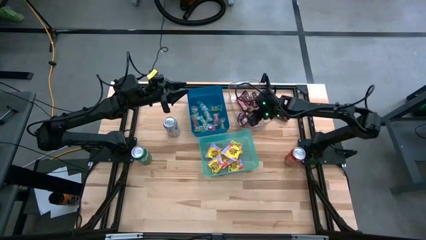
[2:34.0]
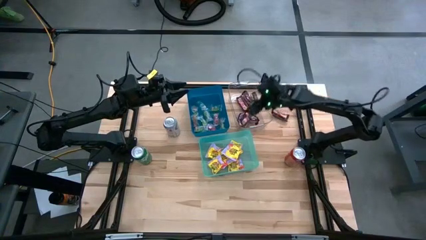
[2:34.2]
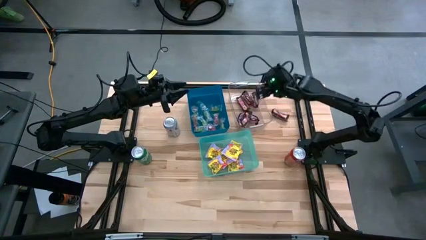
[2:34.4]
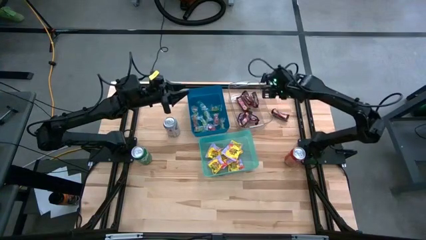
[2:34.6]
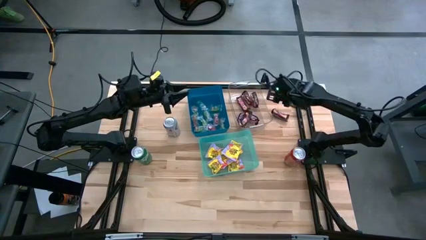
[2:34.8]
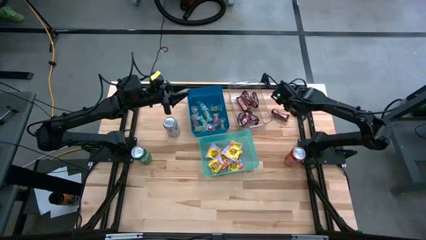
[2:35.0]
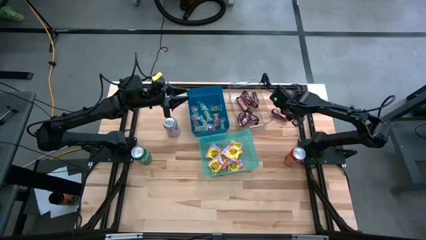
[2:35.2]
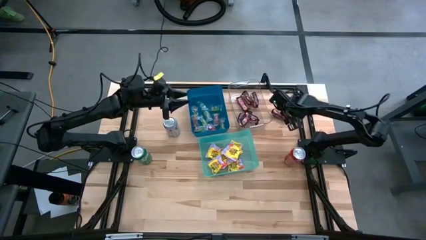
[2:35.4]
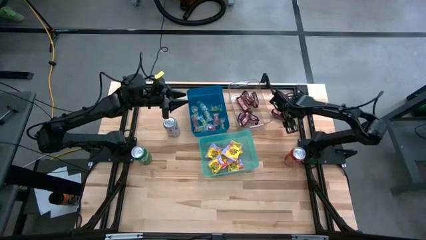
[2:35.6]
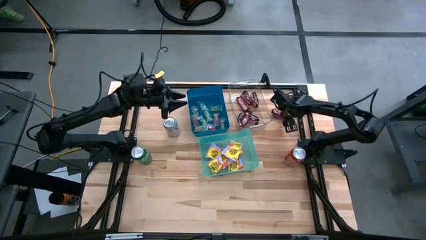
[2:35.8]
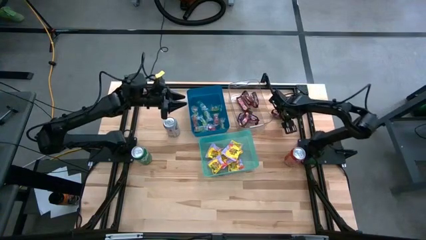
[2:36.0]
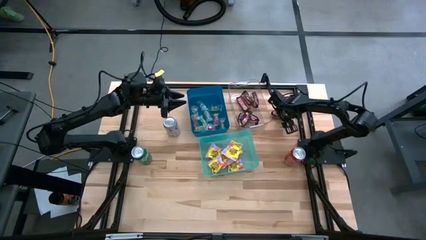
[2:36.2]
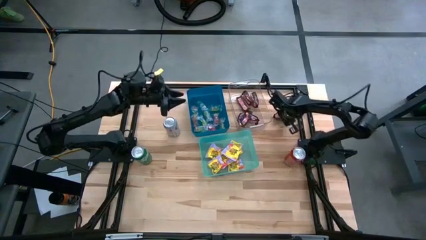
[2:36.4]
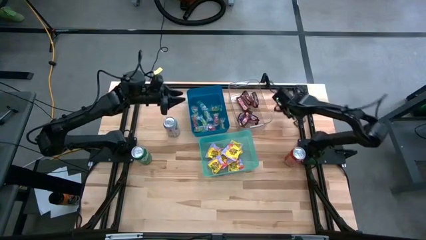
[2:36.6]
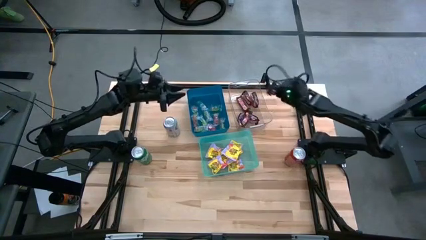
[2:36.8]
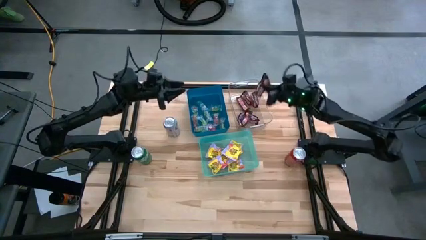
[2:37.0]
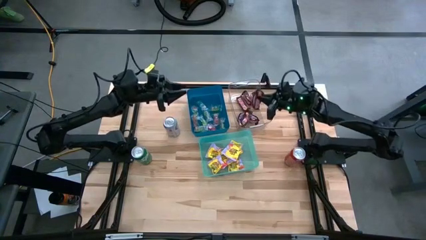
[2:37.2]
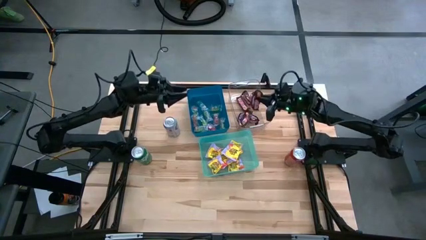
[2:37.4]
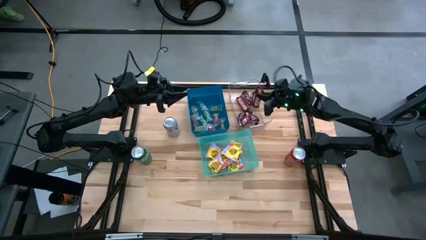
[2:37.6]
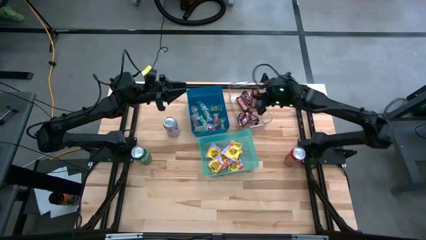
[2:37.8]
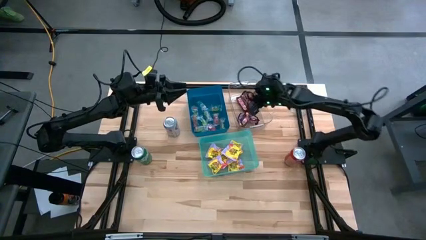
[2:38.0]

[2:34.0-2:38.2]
Task: Sort candy
Put the brown candy into the transparent bin

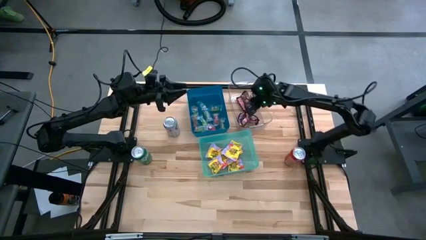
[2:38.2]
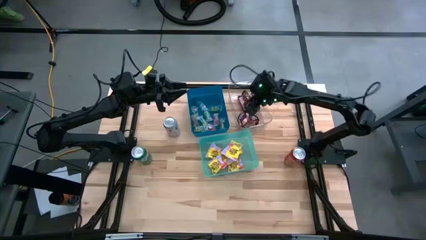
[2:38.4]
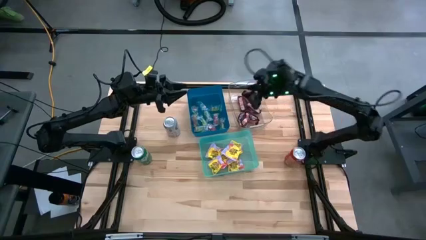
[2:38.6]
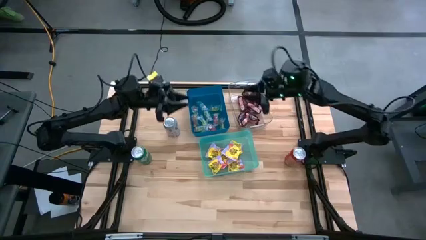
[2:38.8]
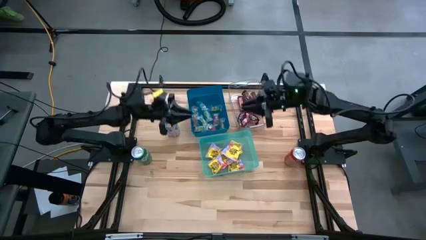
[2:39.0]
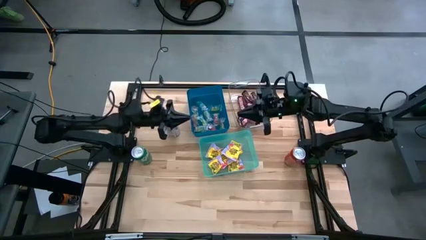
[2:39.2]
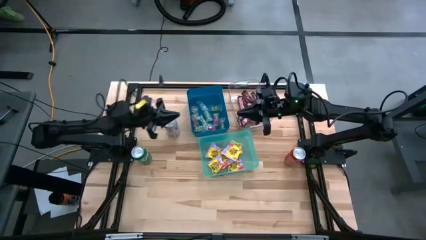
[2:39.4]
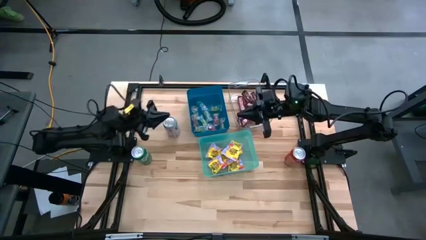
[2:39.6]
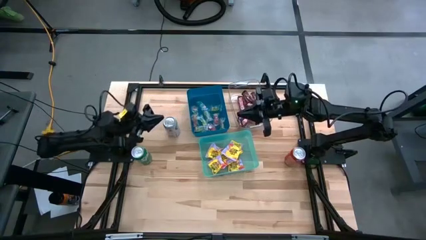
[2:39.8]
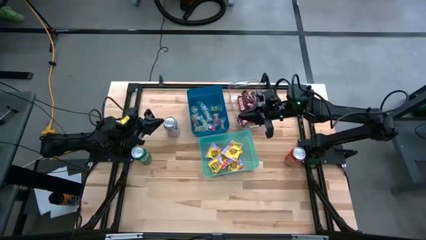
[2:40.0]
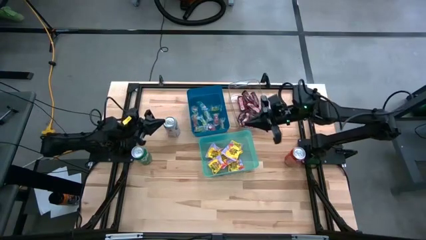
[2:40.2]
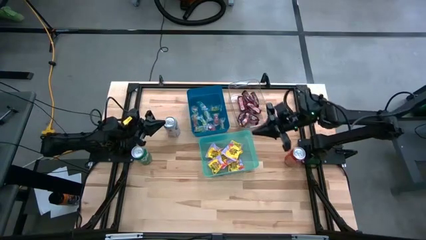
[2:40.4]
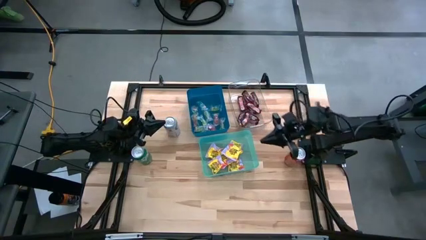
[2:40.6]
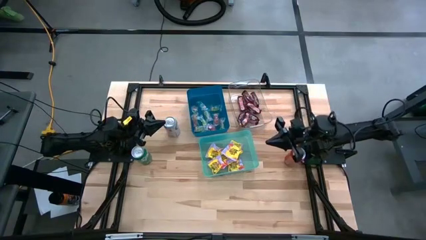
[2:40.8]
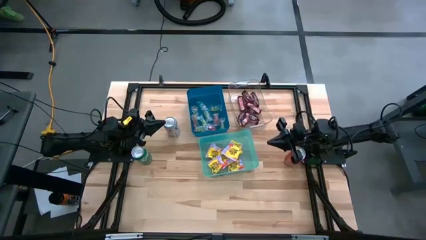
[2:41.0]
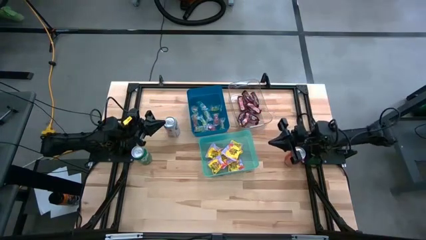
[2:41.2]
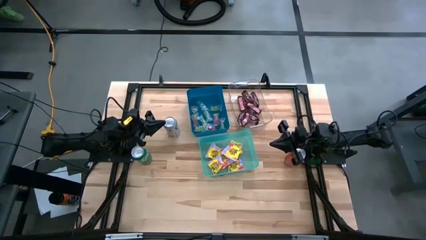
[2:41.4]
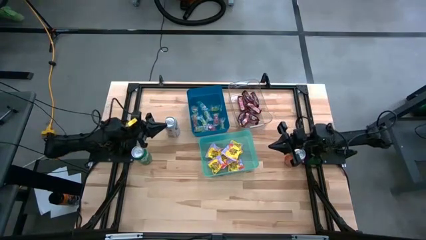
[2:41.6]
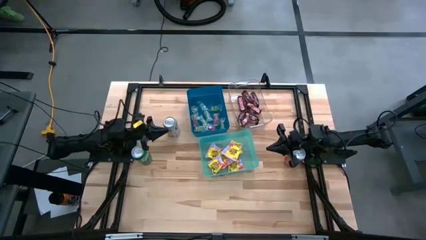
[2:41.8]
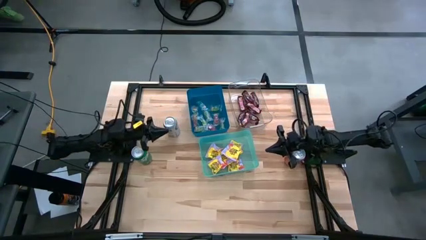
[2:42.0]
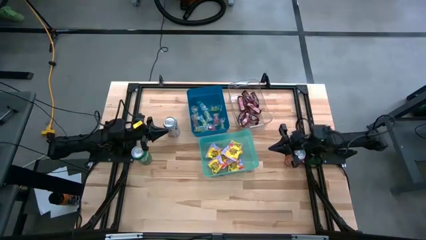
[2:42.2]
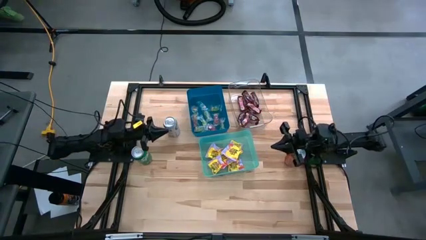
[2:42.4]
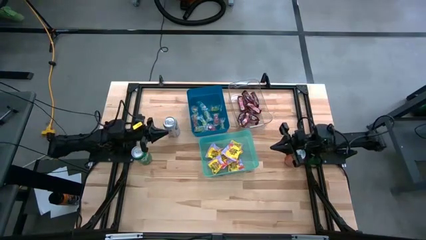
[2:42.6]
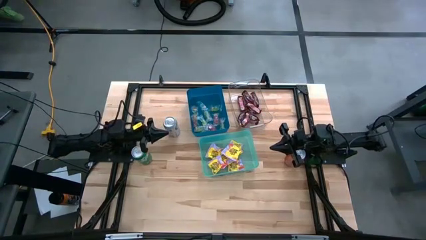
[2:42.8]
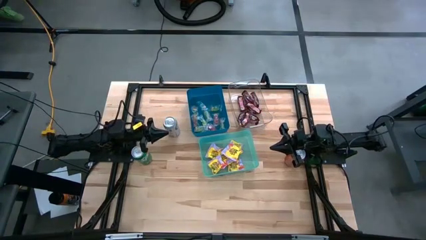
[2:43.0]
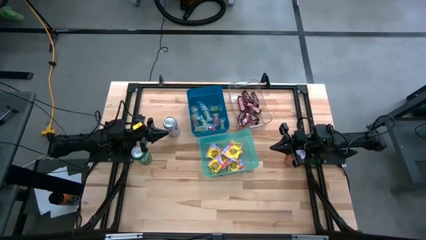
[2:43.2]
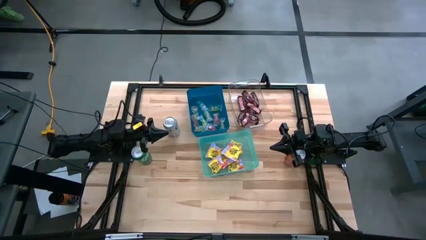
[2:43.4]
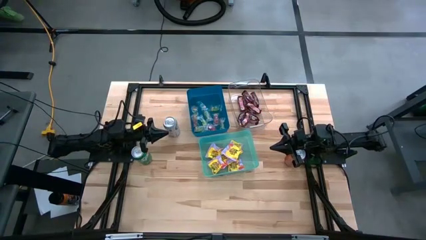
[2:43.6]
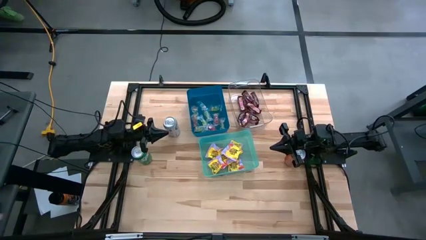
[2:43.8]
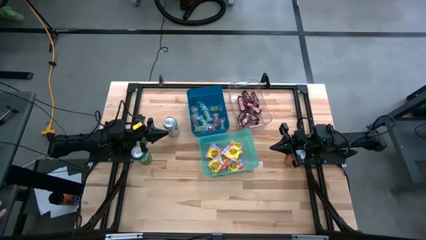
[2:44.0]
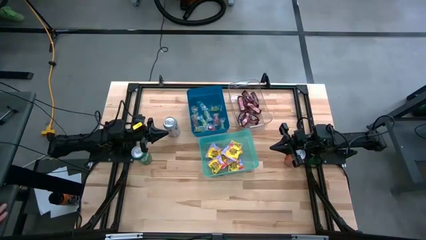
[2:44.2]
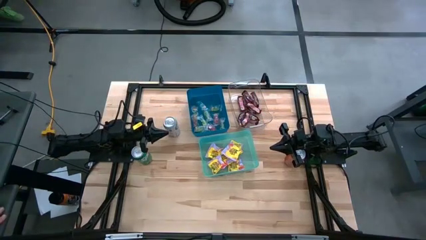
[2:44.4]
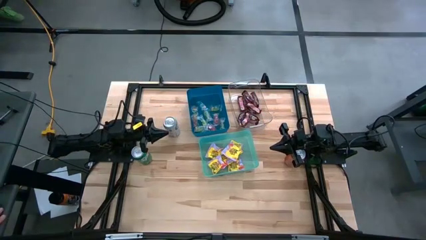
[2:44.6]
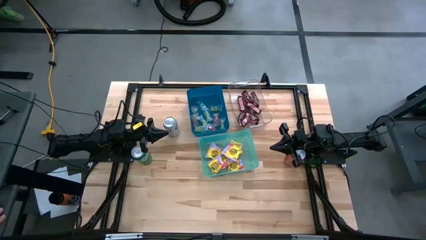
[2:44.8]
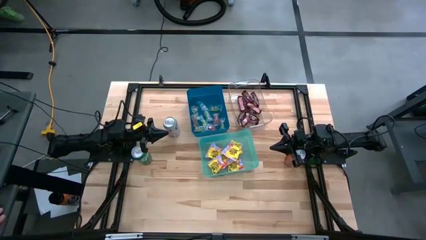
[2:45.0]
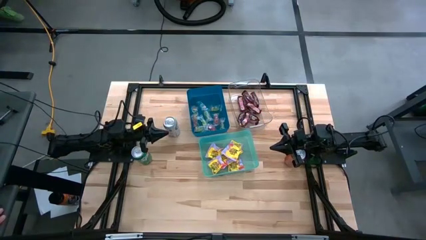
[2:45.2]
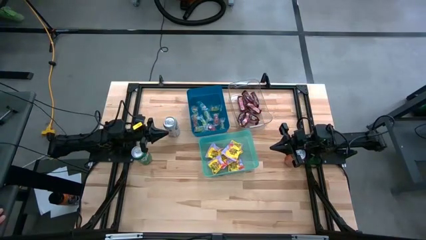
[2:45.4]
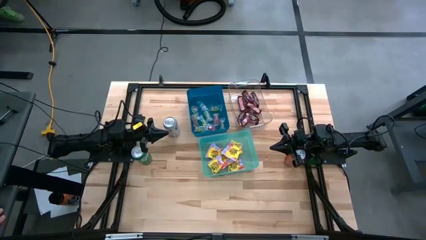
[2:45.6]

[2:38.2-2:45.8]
Return to Home Position

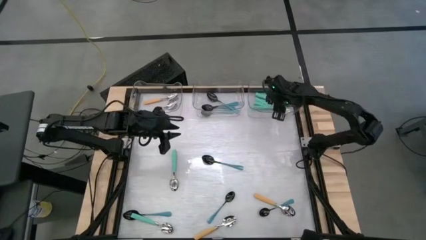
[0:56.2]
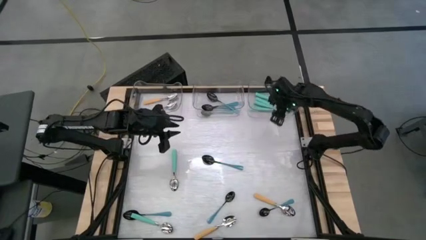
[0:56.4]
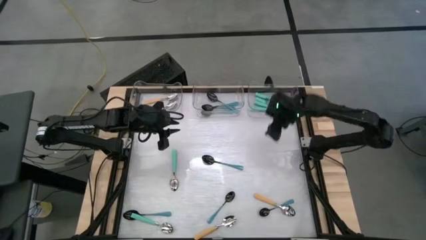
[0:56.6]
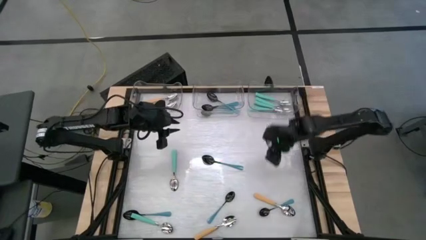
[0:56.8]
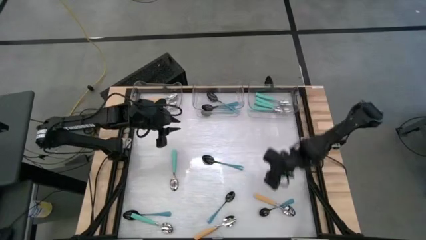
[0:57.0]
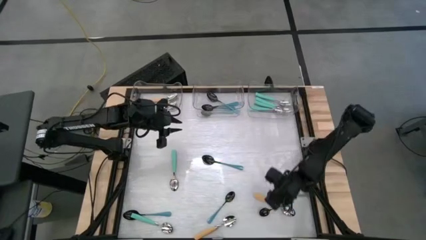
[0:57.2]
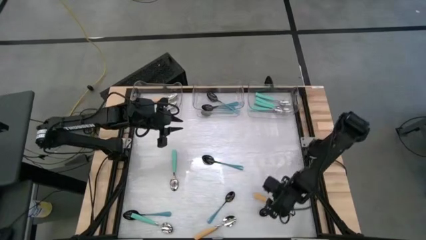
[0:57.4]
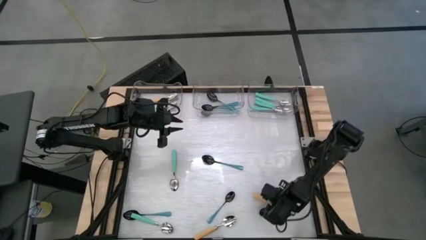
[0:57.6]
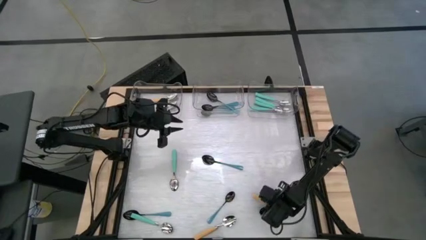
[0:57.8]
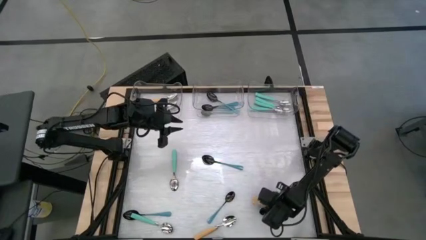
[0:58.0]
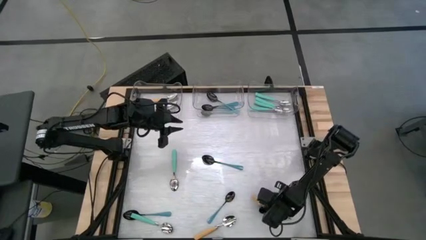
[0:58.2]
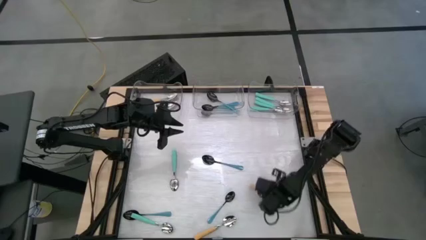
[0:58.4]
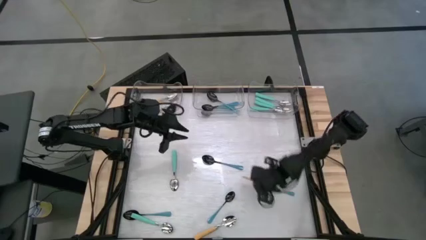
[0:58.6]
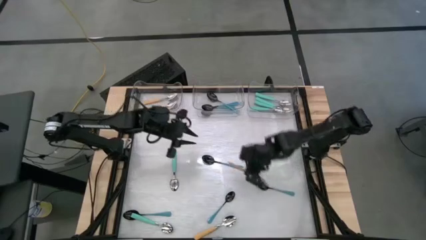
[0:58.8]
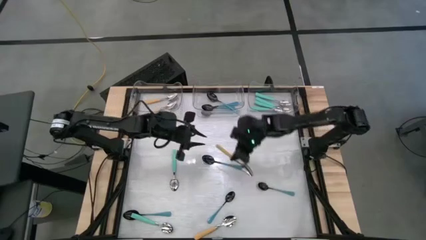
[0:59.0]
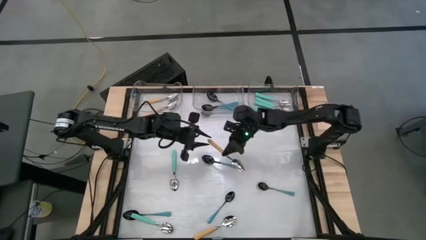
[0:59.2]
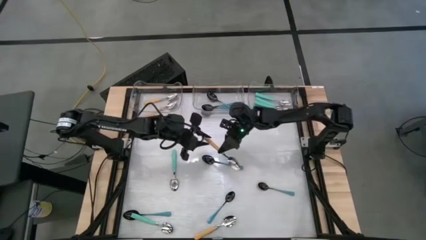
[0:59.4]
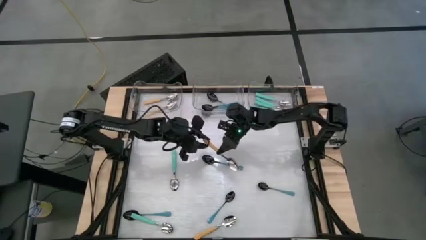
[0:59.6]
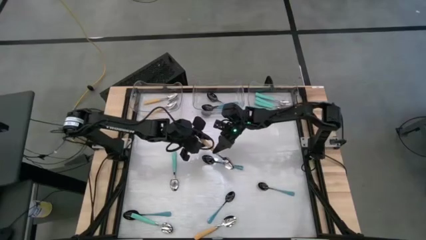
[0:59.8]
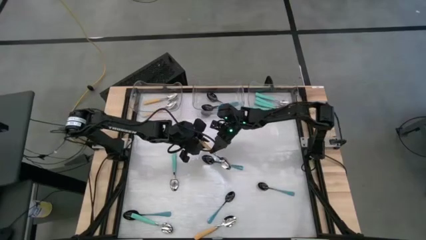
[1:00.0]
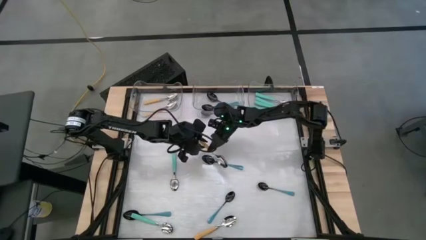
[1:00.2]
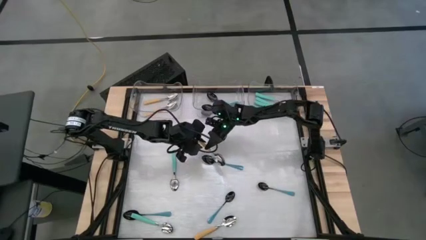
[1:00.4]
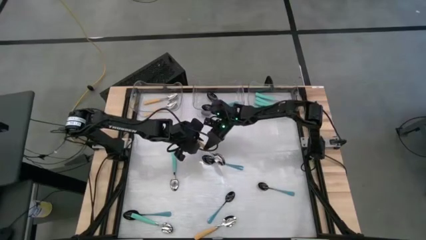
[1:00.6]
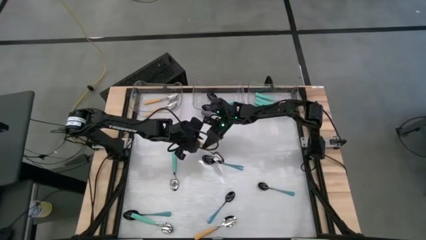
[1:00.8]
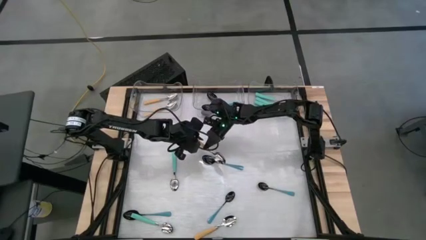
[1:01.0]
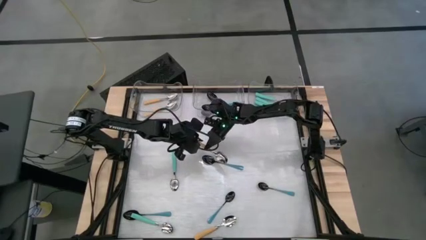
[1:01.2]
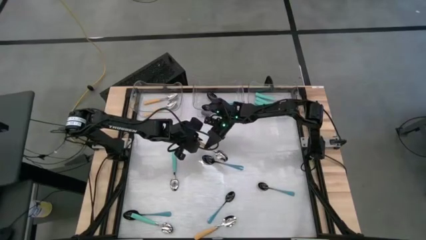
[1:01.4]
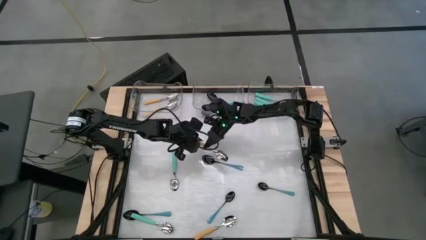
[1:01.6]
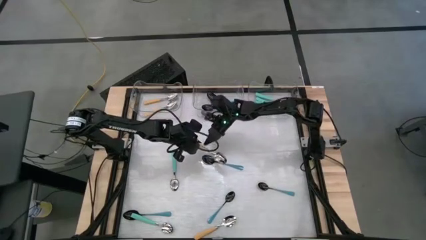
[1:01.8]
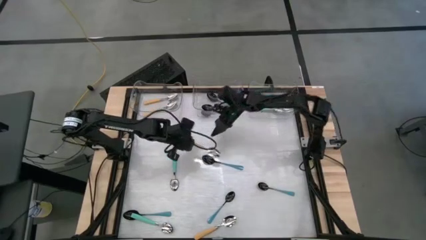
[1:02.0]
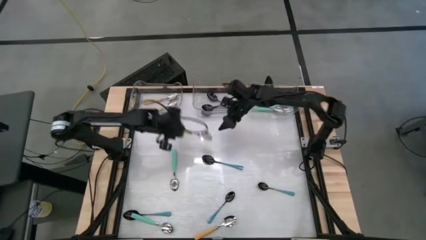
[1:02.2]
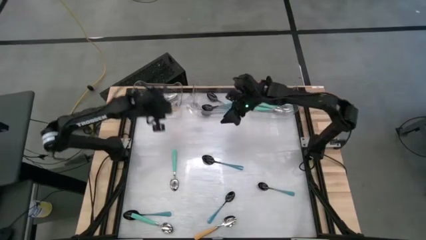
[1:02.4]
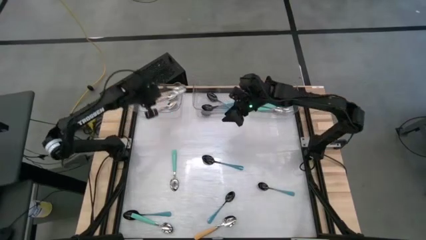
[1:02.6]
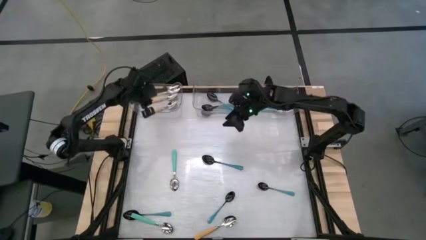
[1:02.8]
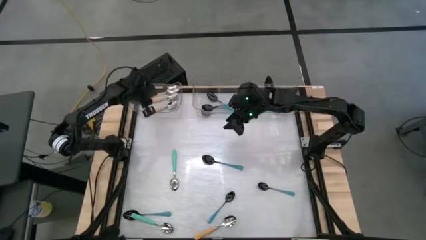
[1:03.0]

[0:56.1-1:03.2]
Task: Sort silverware by color (type)
Put the yellow spoon into the left transparent bin
